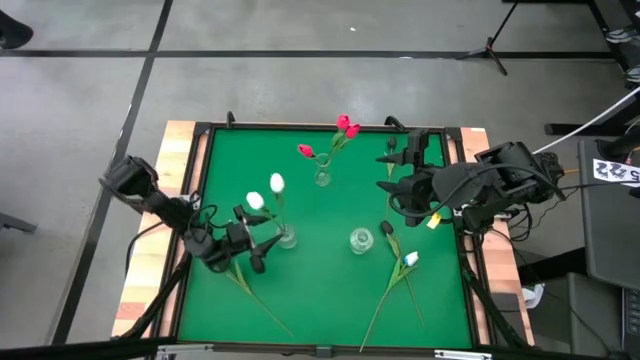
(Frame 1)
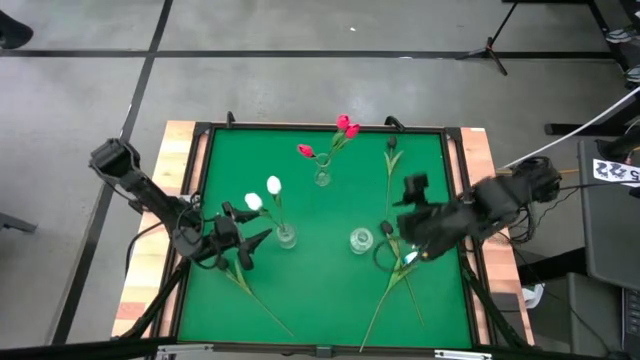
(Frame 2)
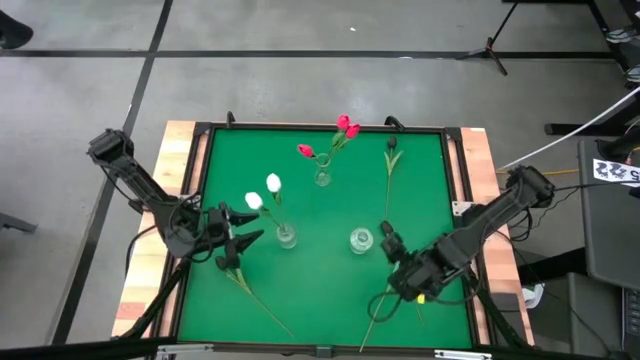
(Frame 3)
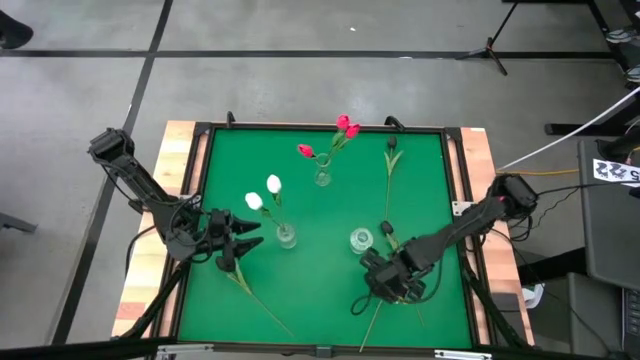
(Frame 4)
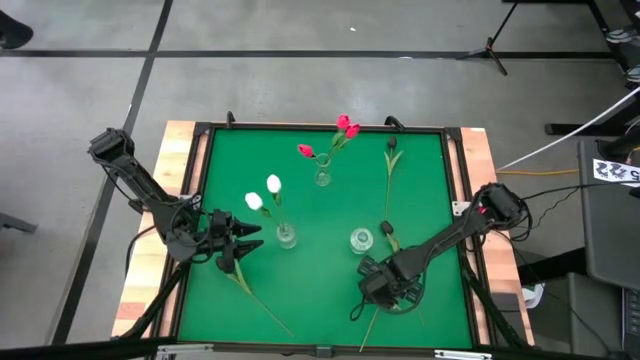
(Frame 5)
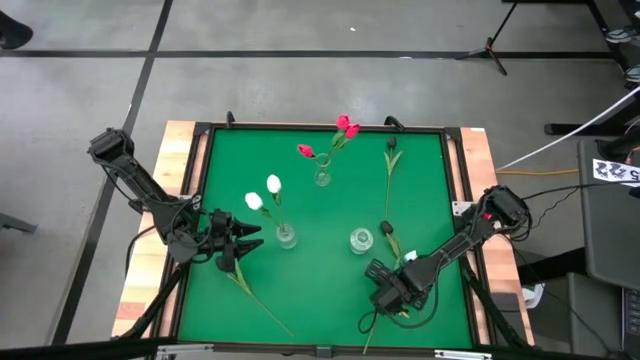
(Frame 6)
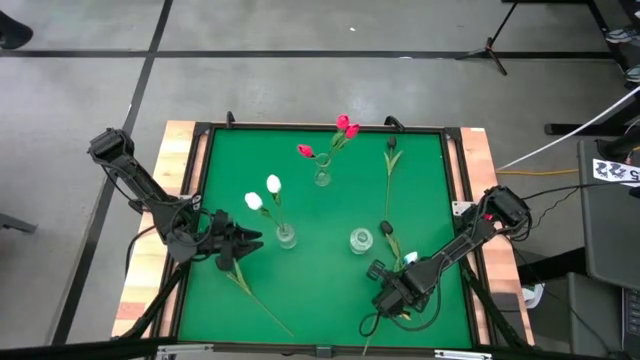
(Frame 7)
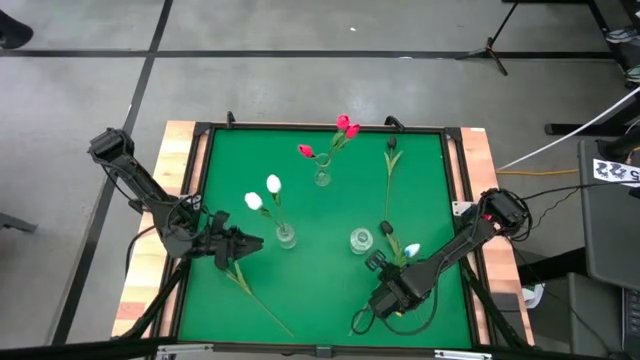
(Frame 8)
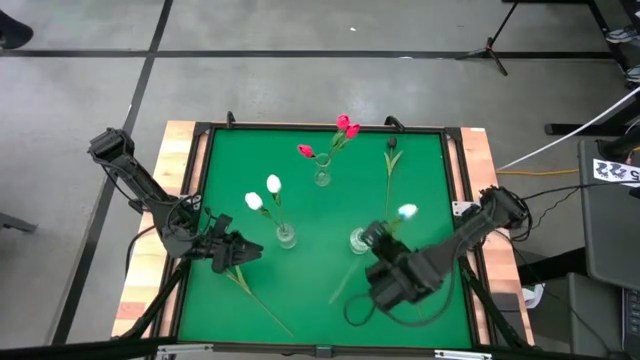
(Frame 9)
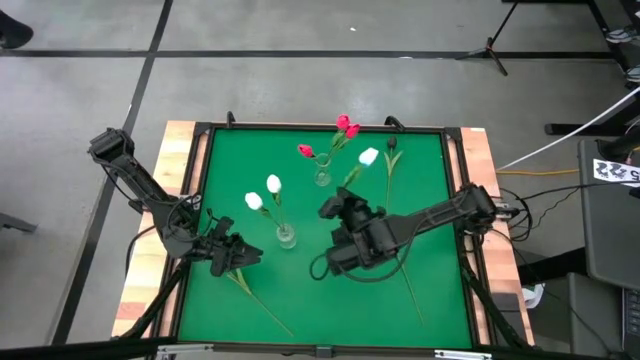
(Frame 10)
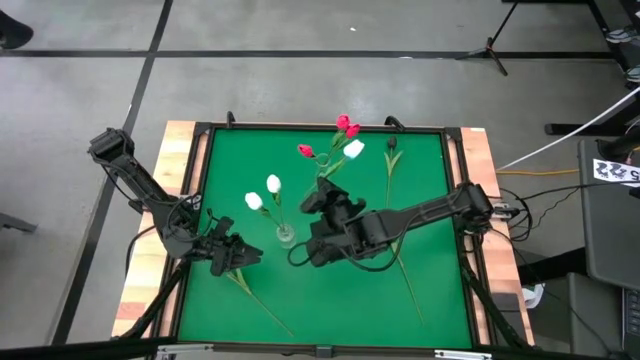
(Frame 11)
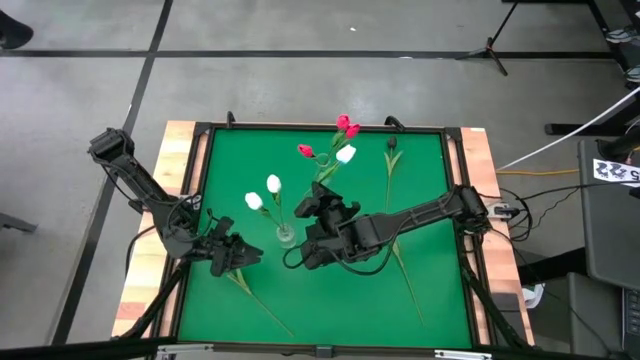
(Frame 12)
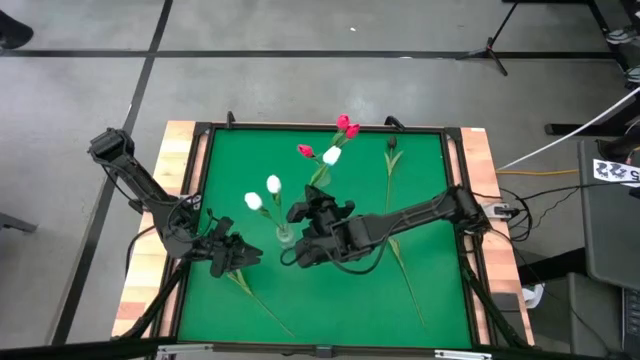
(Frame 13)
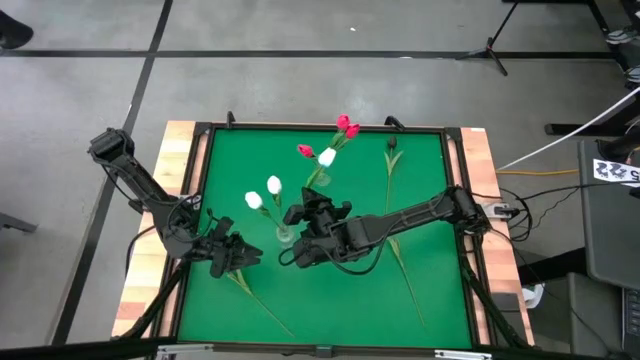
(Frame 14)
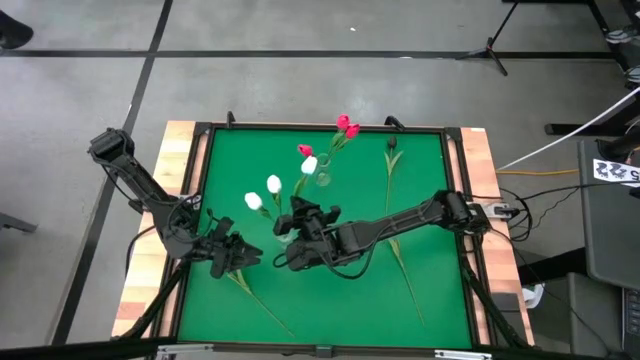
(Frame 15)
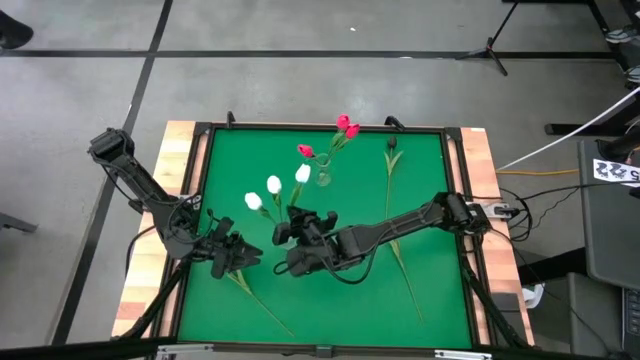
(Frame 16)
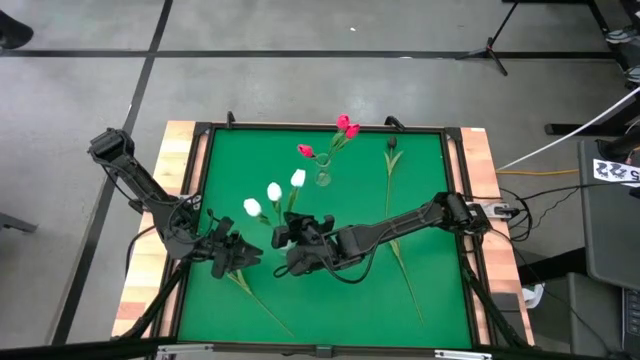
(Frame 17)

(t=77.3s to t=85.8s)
Task: Sort flowers into vase by color
Put the white tulip into the bottom left transparent vase

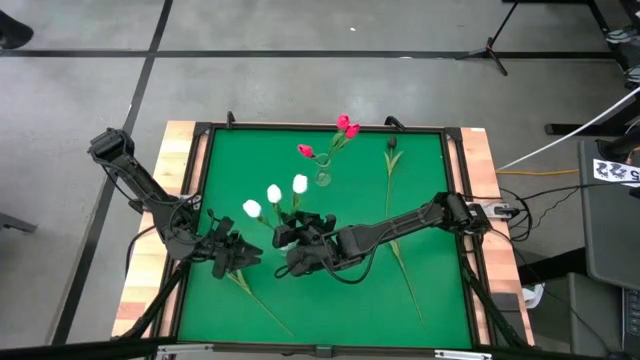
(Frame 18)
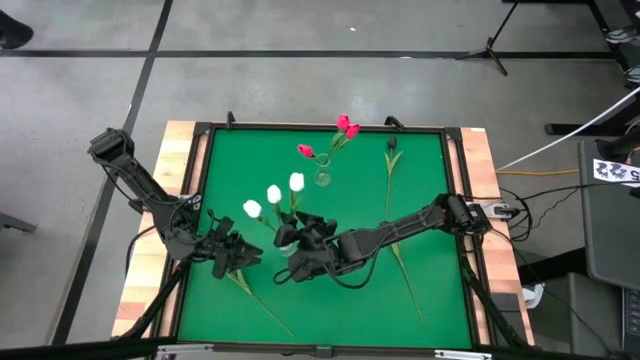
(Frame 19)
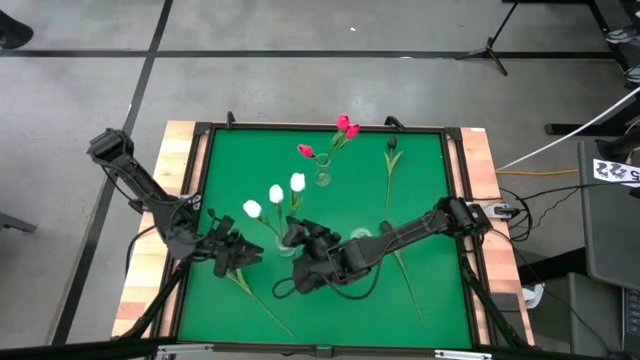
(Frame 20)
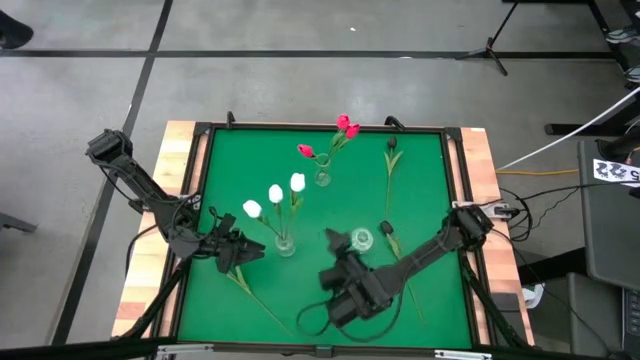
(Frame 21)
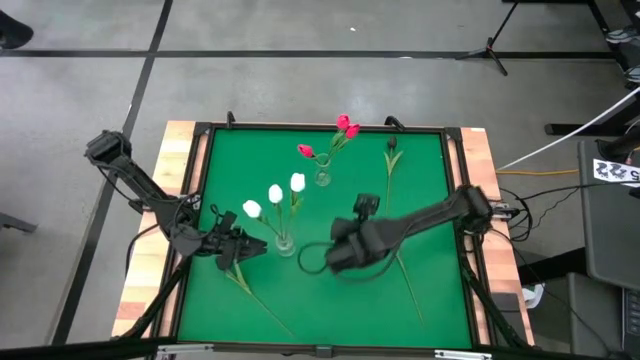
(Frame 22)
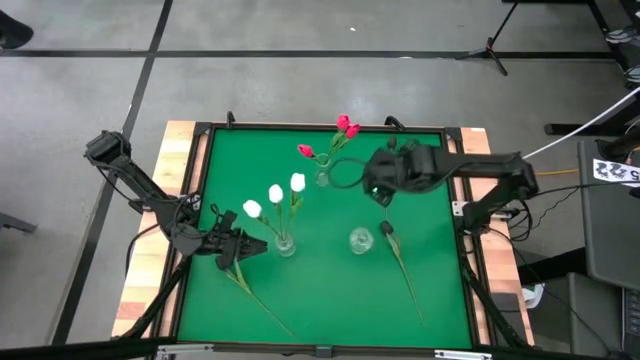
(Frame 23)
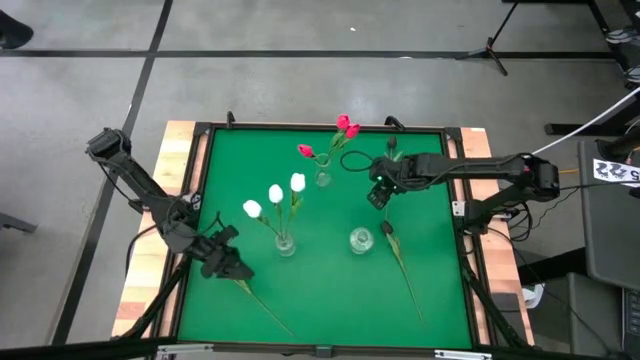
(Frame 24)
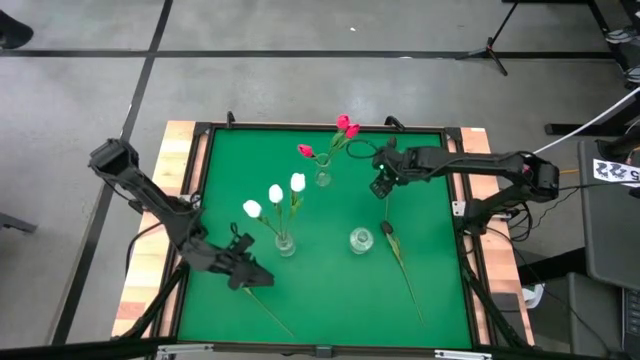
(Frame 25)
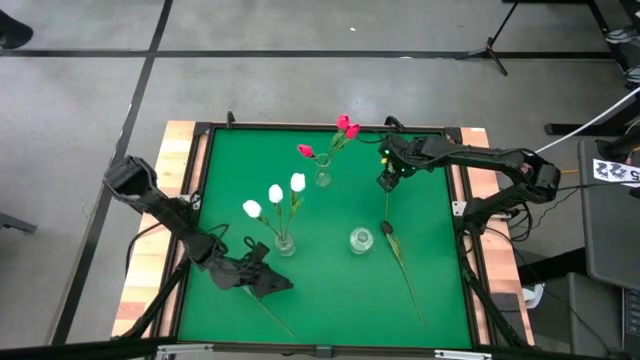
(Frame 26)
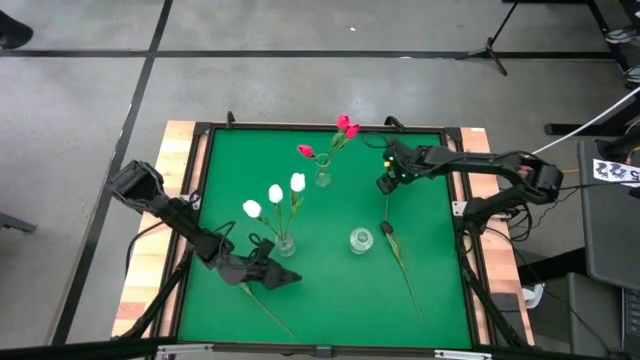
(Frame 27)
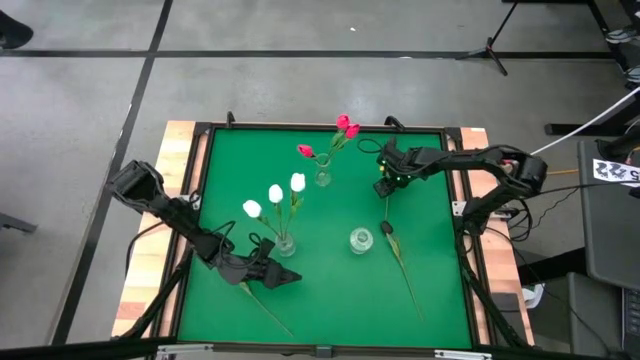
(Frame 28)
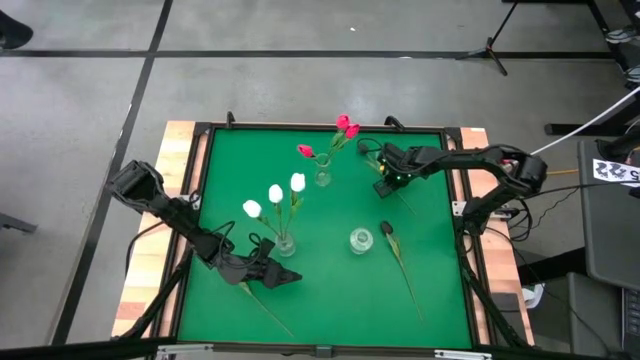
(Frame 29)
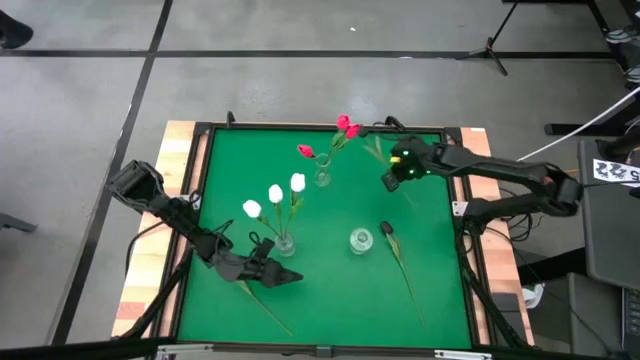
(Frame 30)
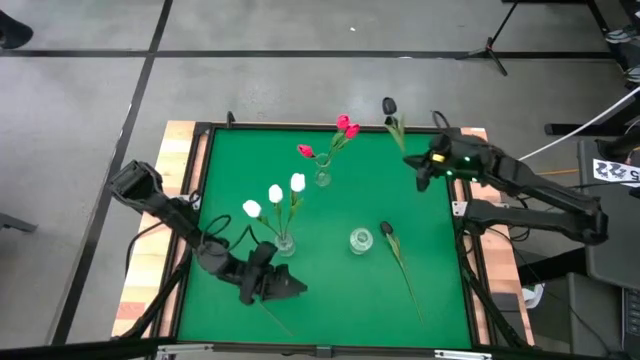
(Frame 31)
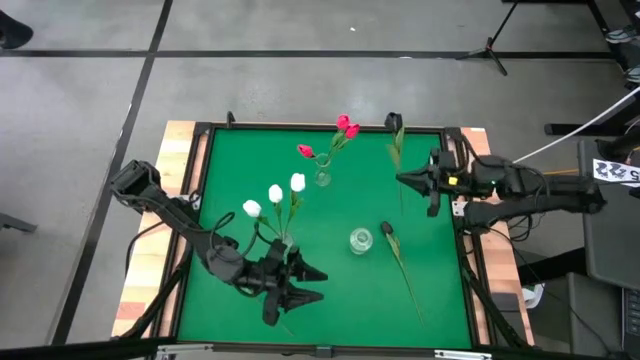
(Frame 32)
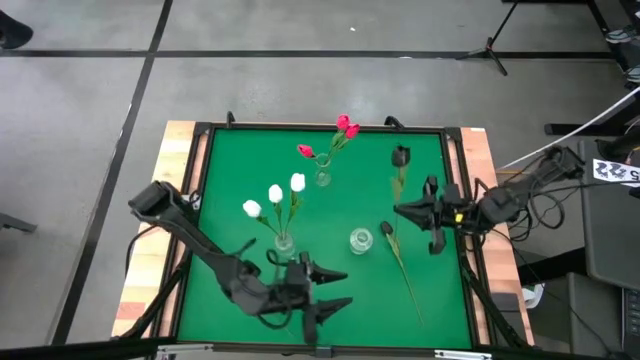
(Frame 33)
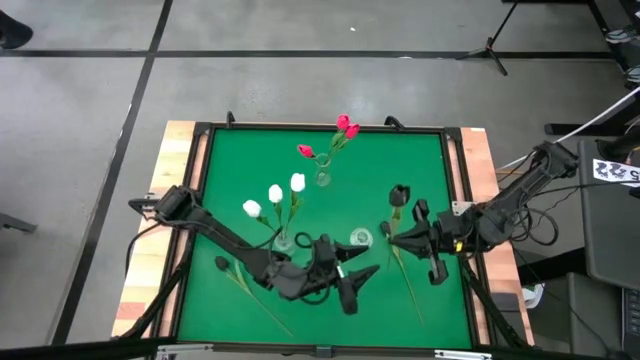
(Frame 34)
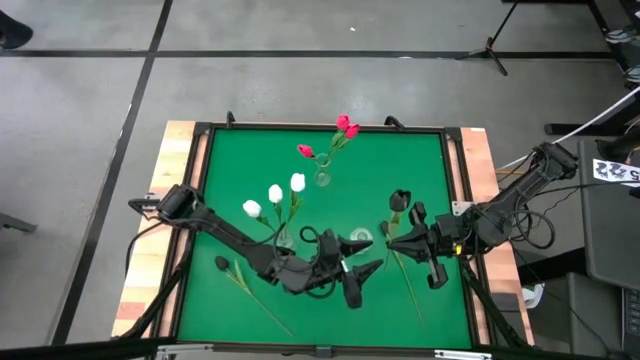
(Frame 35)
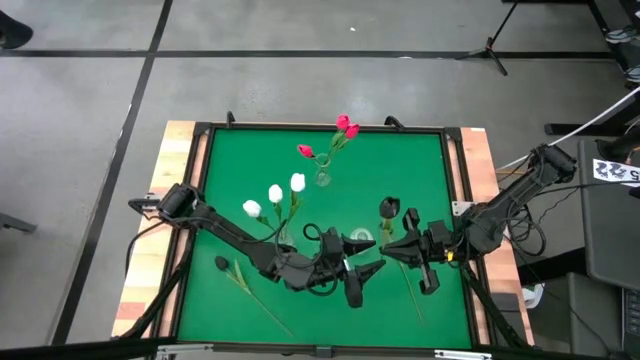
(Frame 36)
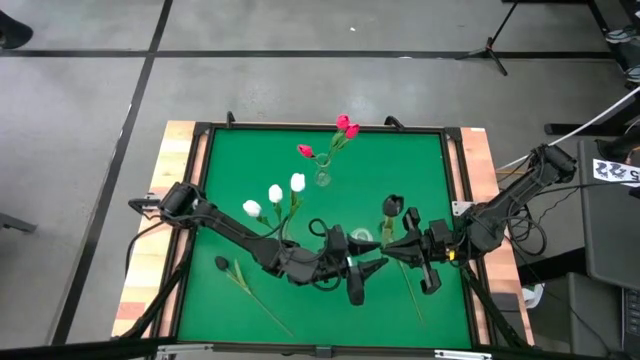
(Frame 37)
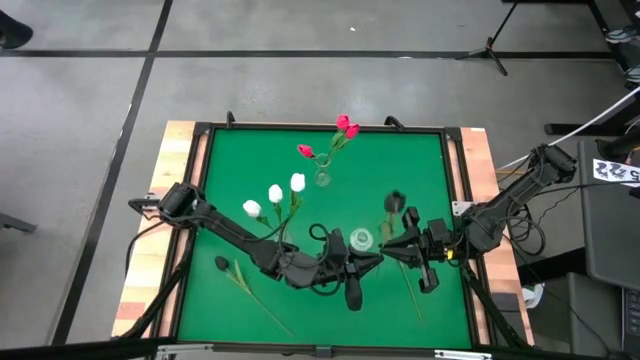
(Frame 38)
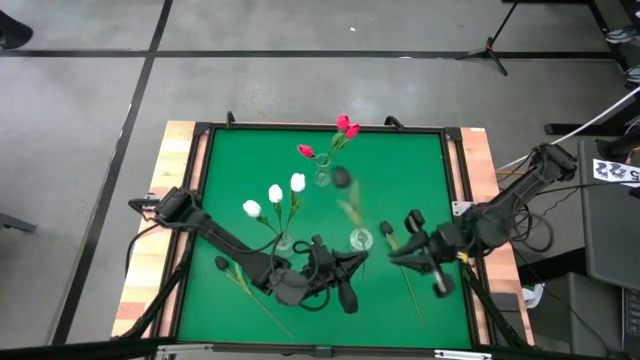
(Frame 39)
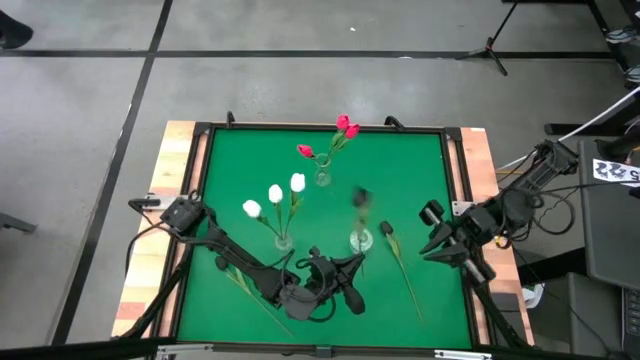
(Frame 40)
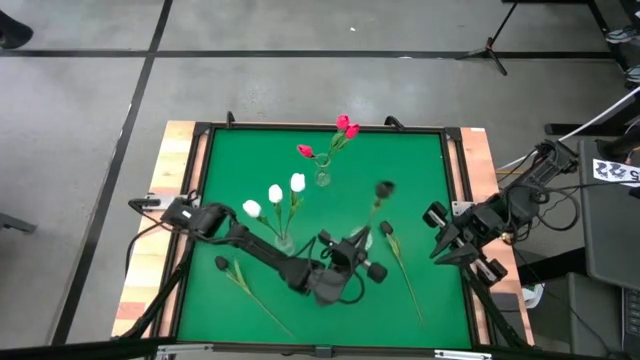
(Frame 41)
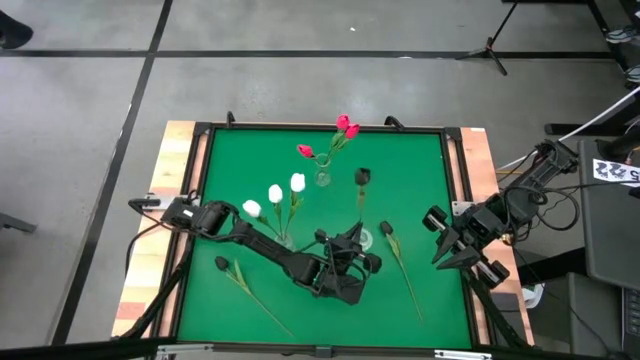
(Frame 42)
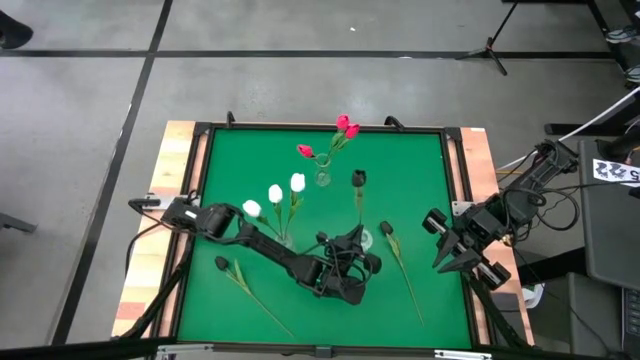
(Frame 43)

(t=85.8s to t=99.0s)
Put the top black tulip into the bottom right transparent vase
